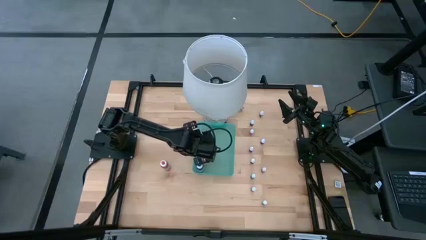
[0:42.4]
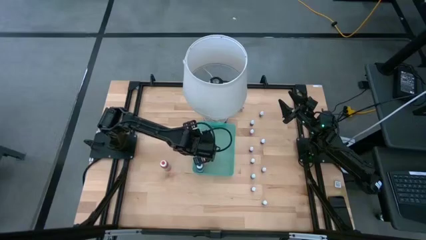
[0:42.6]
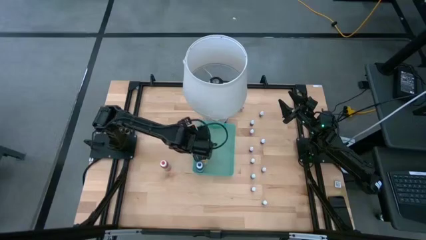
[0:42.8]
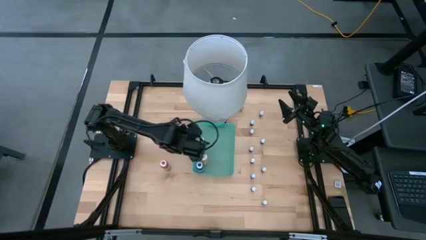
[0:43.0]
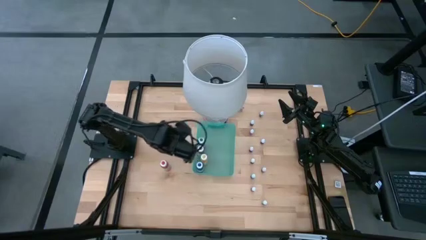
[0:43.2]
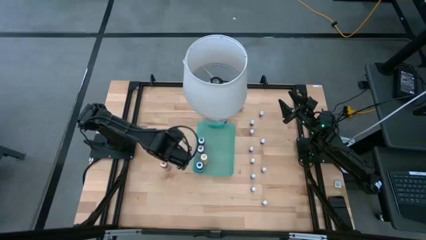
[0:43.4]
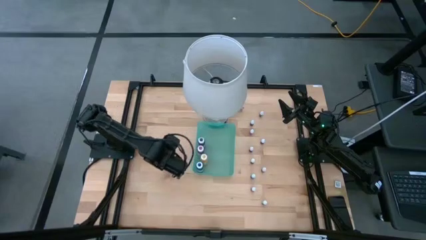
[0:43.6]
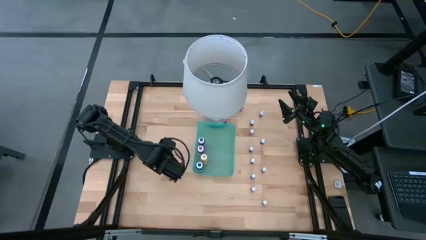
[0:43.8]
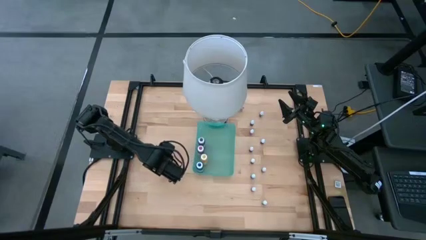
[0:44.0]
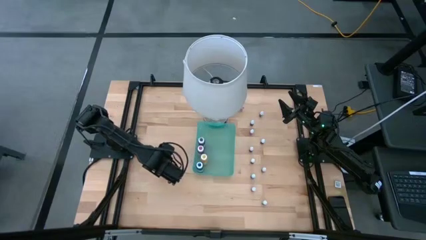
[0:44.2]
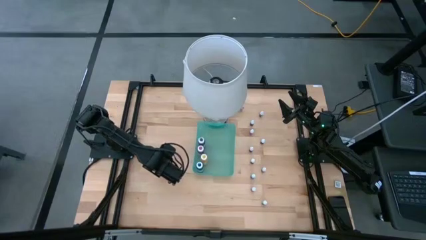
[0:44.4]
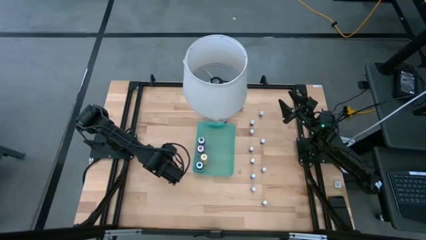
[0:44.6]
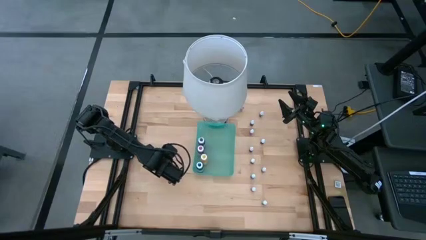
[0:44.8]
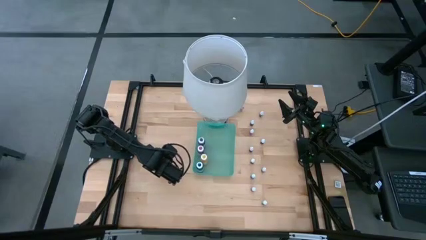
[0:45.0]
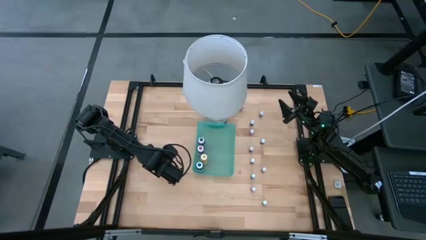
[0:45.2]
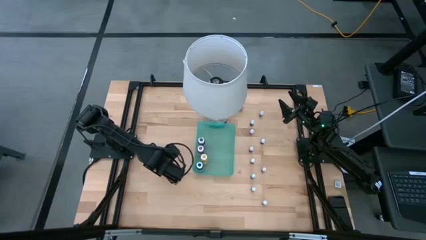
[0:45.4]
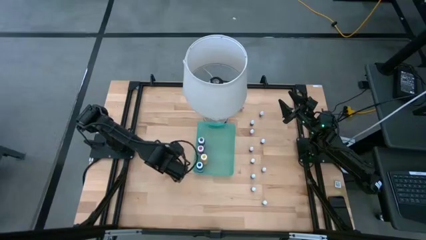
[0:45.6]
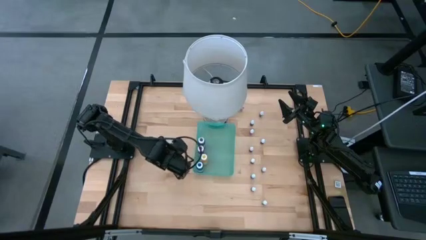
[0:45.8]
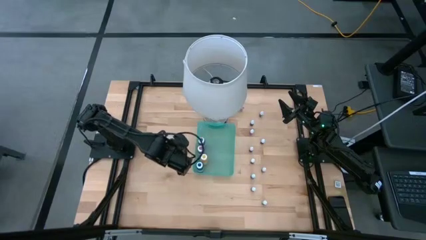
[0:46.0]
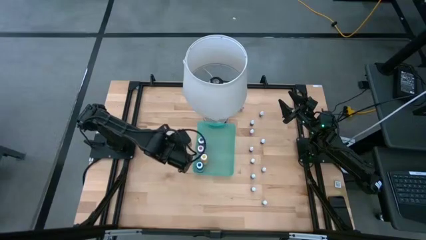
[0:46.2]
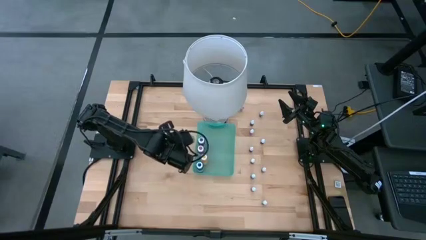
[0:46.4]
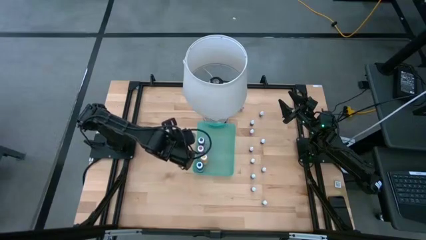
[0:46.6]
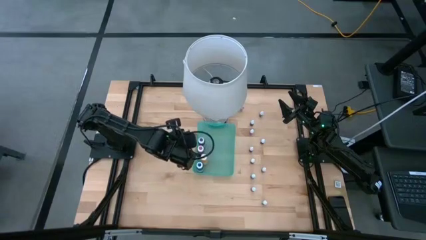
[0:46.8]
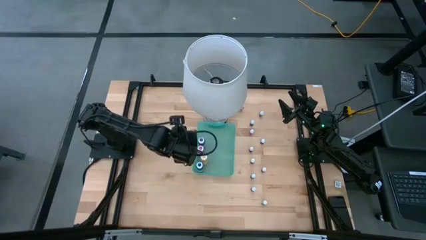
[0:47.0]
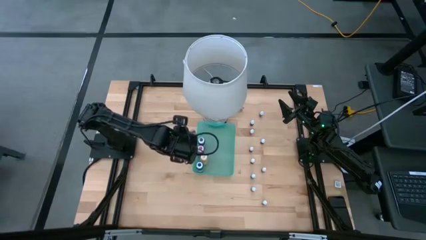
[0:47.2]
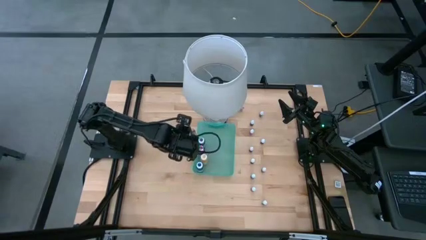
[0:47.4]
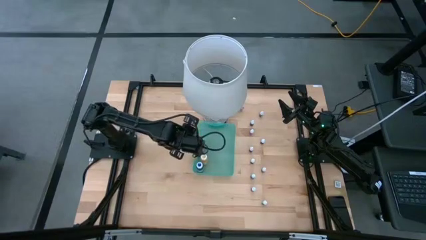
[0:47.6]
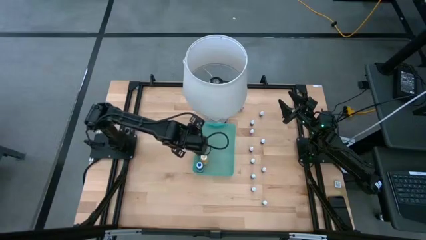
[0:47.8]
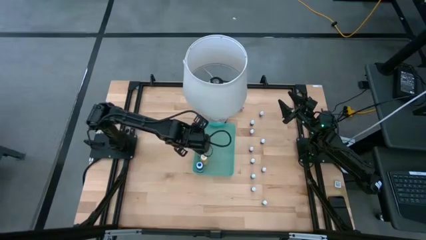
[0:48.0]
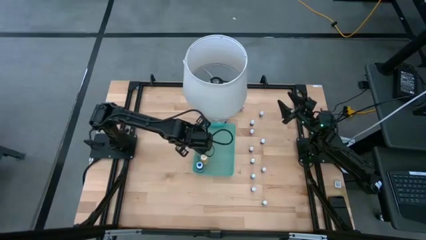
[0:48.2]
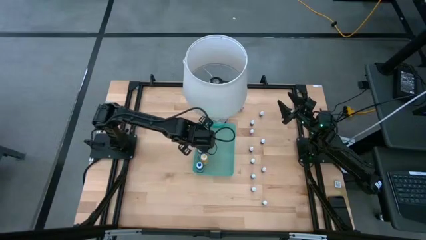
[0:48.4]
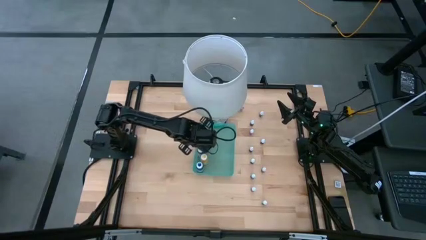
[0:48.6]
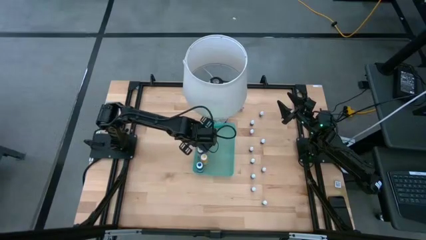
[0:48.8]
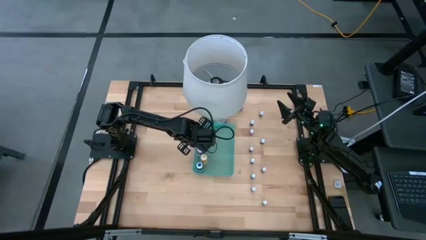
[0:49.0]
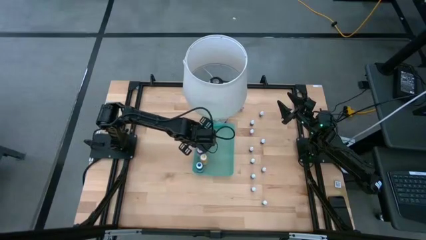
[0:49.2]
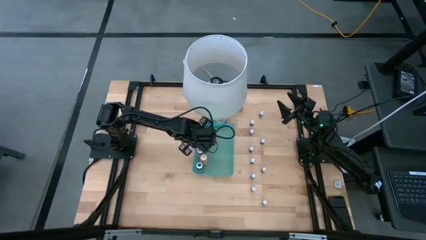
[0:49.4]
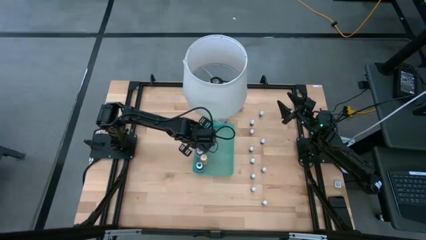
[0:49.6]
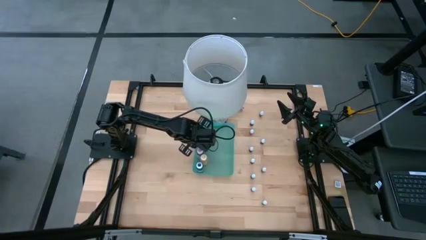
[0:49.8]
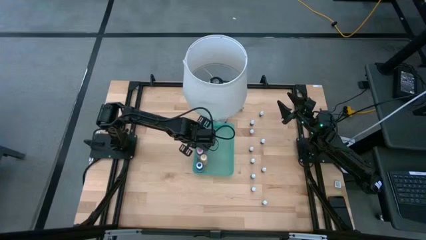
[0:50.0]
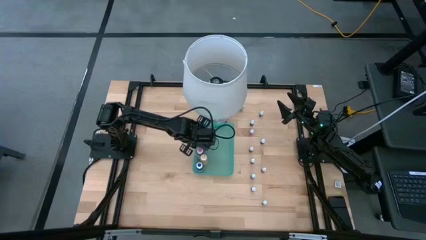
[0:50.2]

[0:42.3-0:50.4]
Task: Pick & Place food coloring
Put the large red food coloring bottle into the green bin

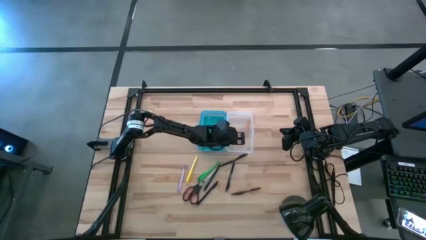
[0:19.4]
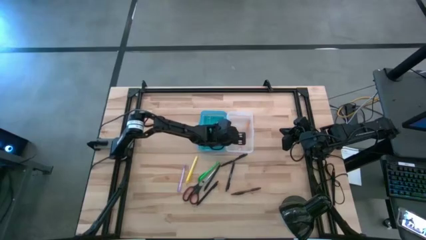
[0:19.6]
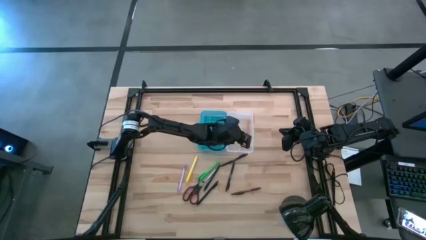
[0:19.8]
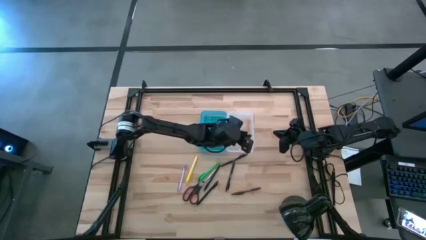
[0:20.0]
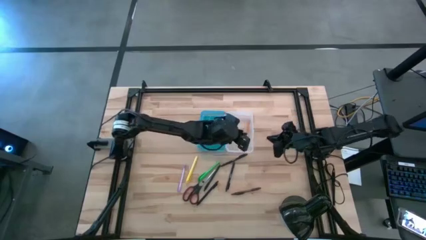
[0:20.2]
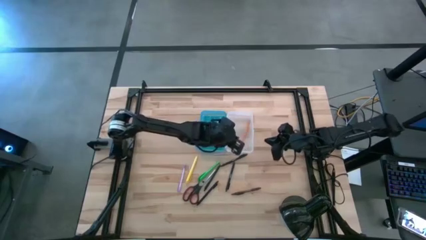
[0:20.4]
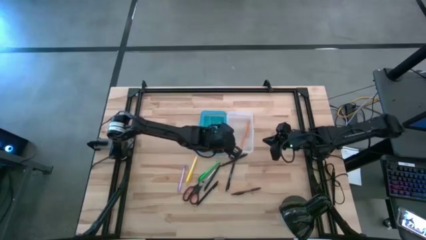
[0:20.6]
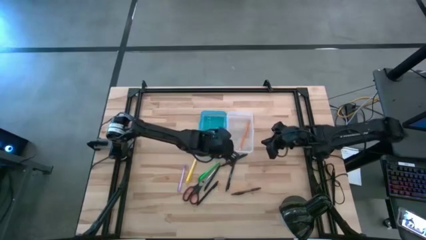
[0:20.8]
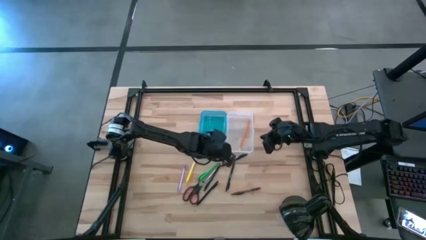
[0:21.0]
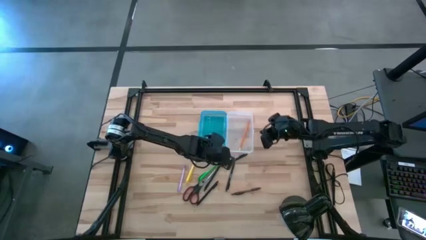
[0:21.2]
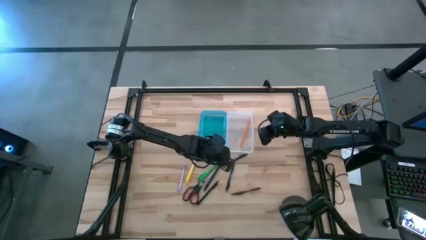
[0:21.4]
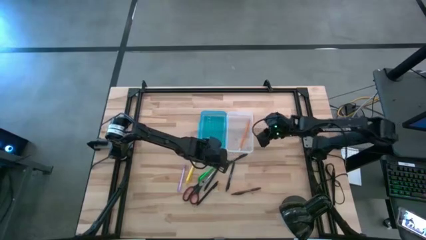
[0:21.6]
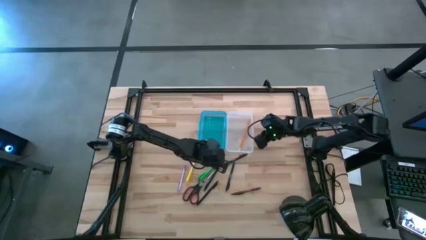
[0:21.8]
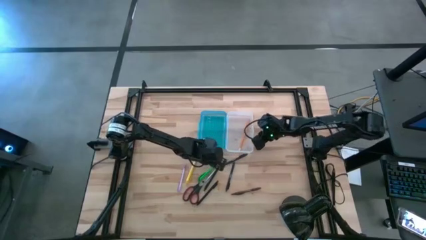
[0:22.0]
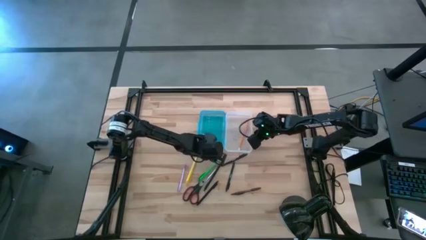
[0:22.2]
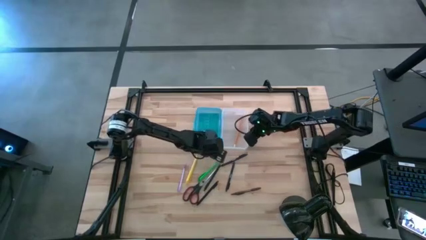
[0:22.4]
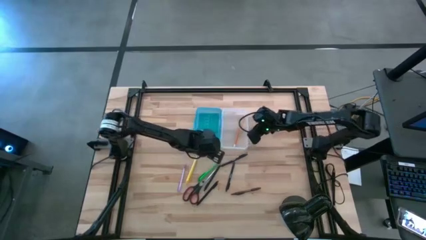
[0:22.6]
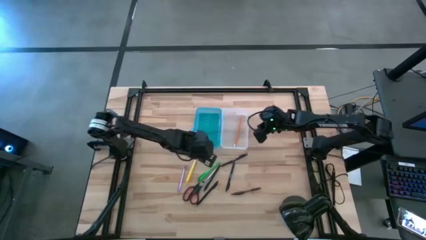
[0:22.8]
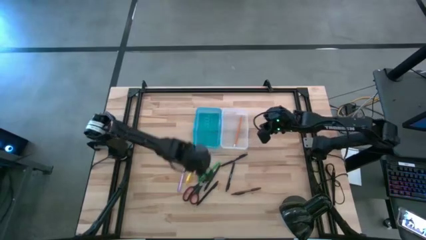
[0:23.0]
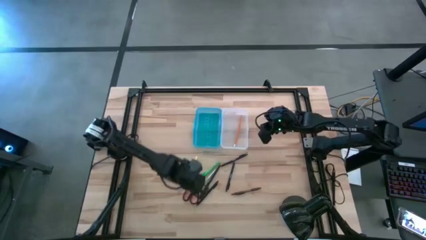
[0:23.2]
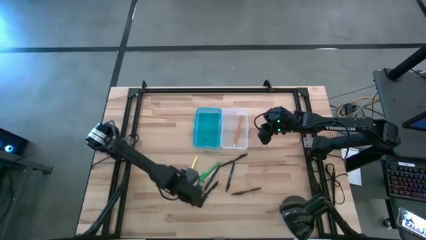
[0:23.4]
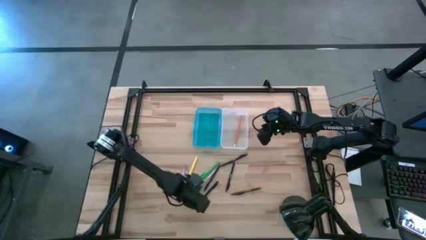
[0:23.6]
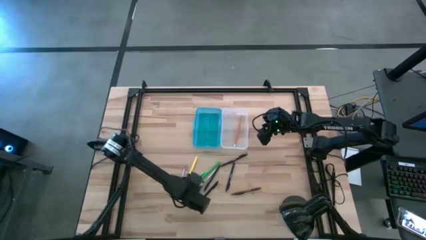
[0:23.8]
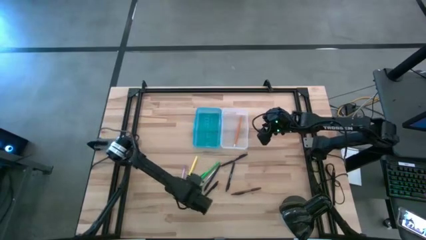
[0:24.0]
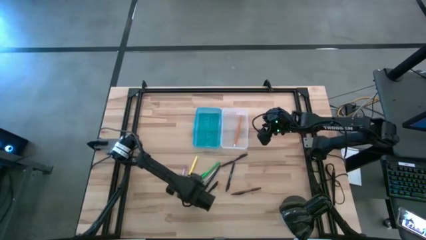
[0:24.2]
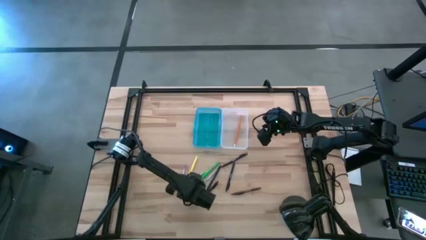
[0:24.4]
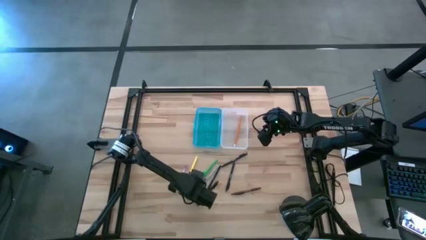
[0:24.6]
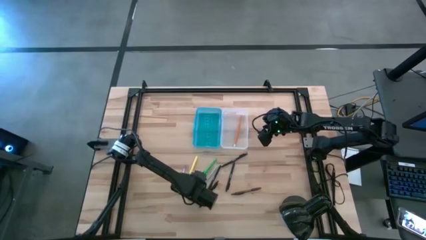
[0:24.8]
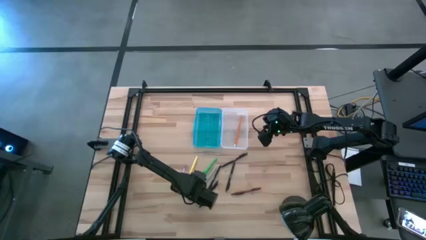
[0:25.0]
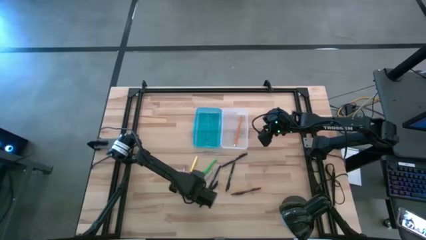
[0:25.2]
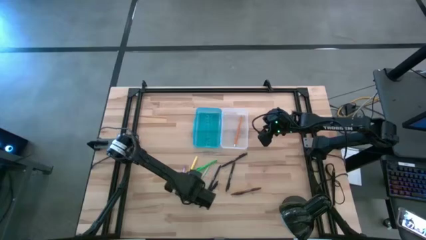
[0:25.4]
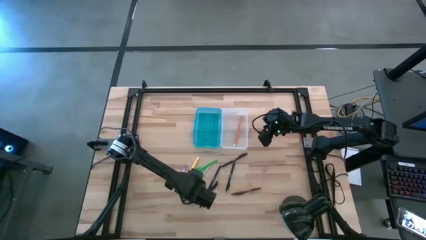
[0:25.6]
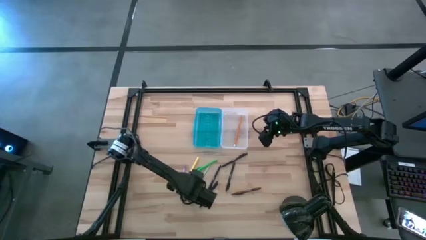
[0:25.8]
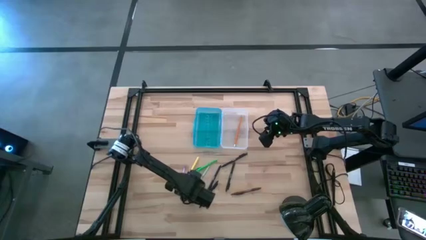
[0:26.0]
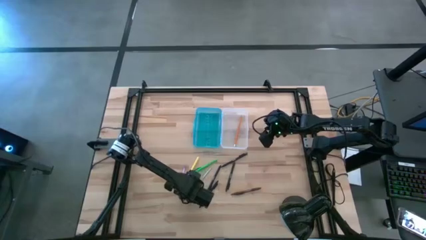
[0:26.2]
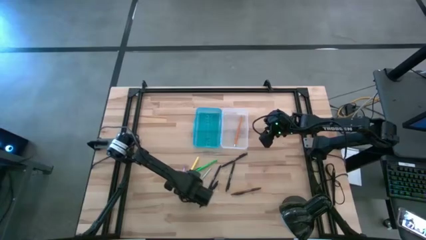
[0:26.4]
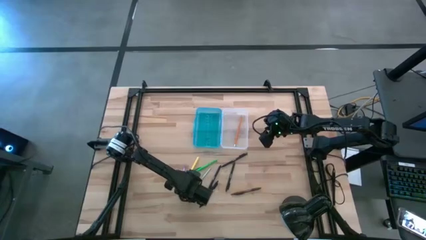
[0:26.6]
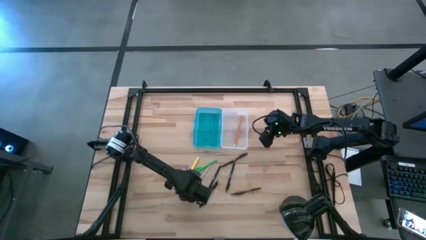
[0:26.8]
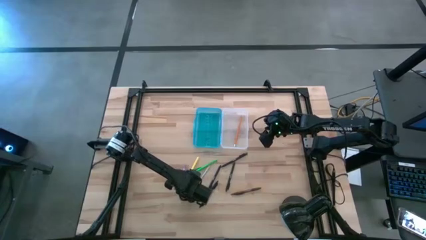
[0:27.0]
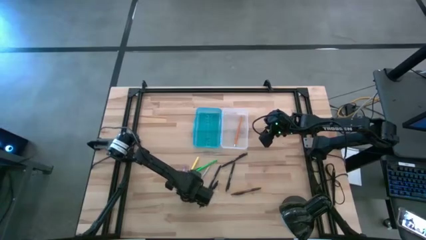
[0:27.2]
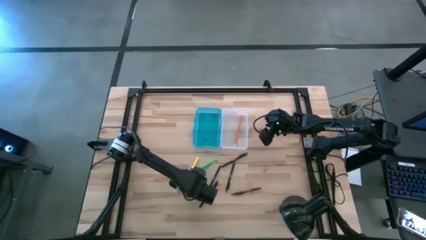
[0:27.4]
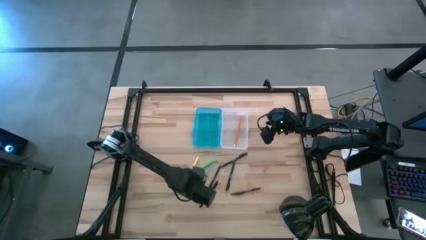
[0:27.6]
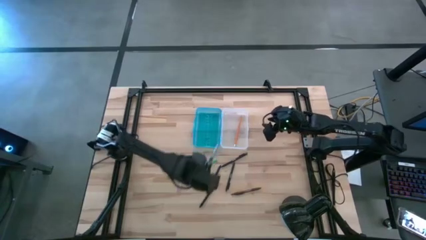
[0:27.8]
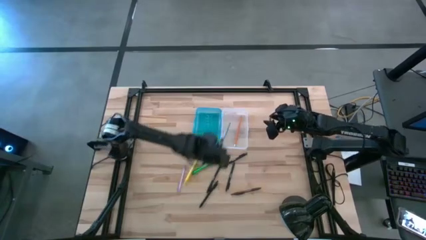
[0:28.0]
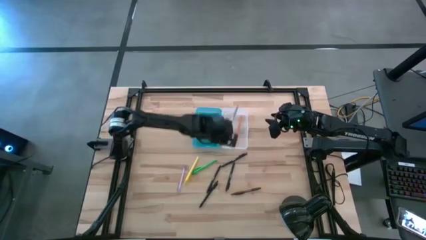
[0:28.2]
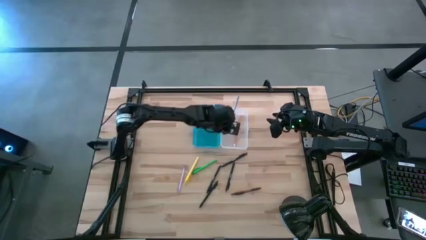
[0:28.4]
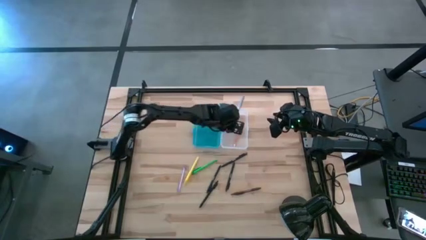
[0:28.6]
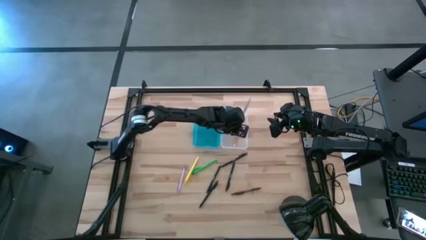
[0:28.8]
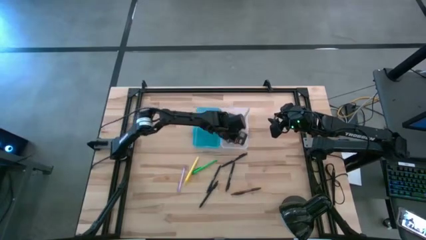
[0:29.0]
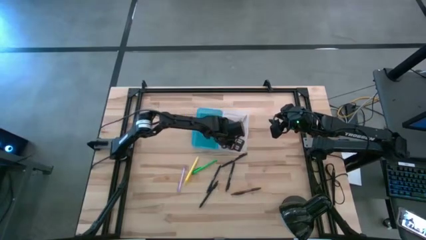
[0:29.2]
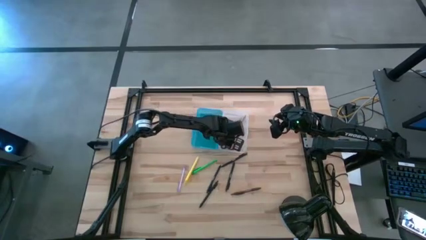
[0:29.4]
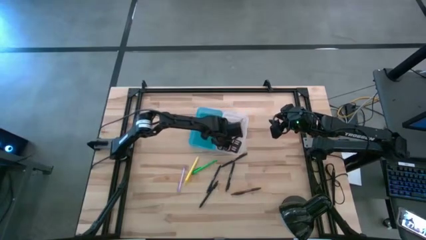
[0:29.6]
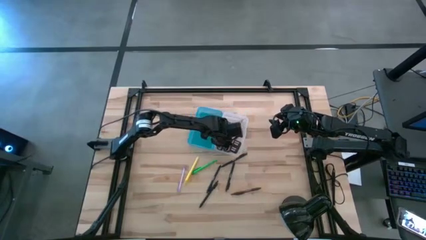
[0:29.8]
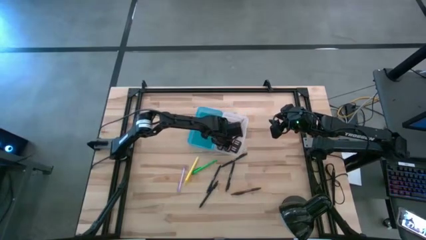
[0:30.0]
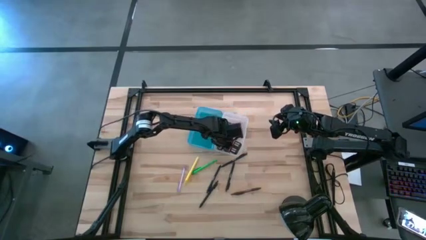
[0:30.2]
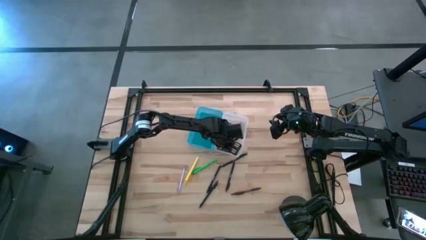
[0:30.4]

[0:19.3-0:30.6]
Task: Pick & place school supplies into a supply box
Put the black scissors into the supply box
